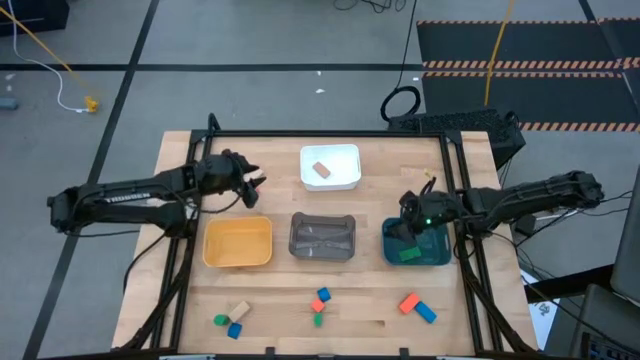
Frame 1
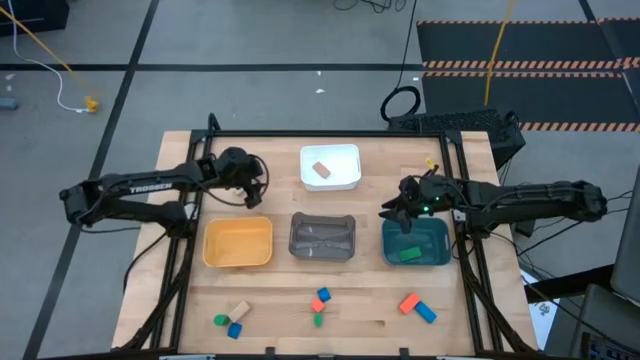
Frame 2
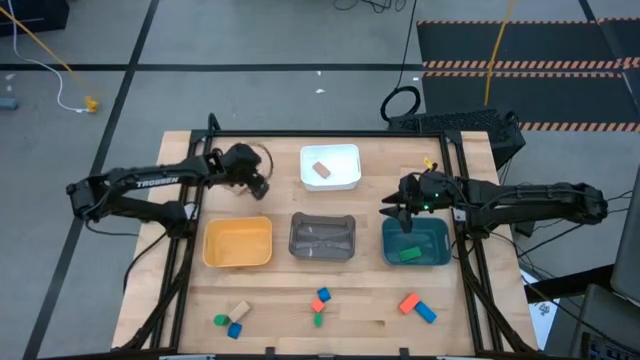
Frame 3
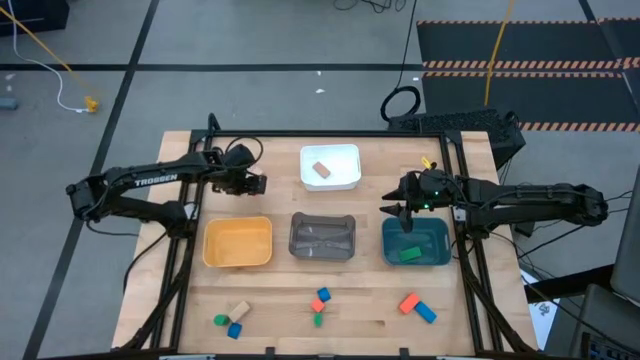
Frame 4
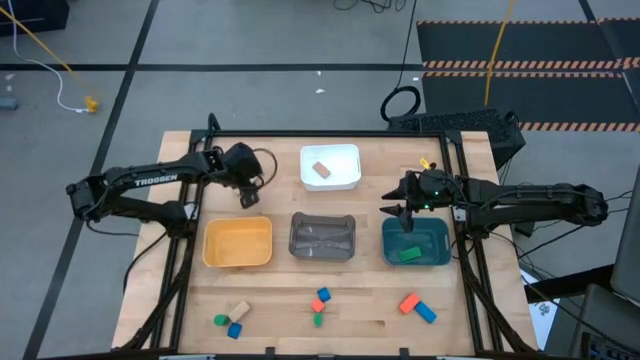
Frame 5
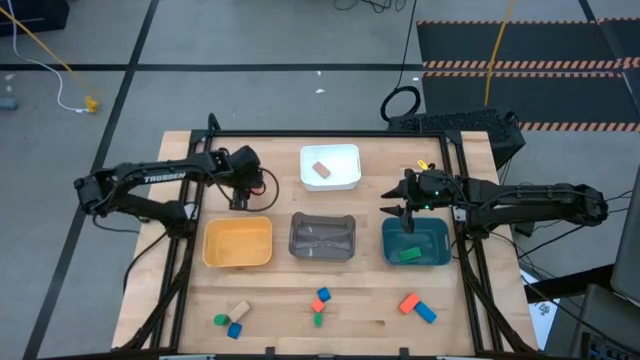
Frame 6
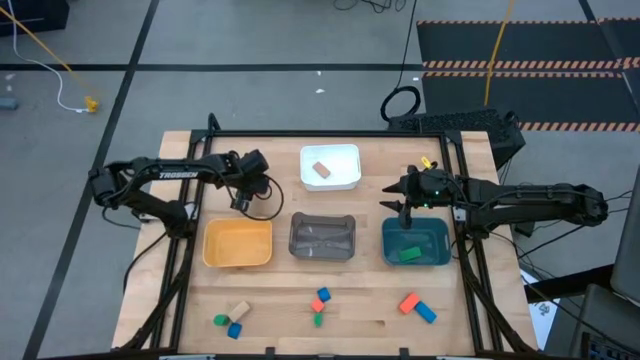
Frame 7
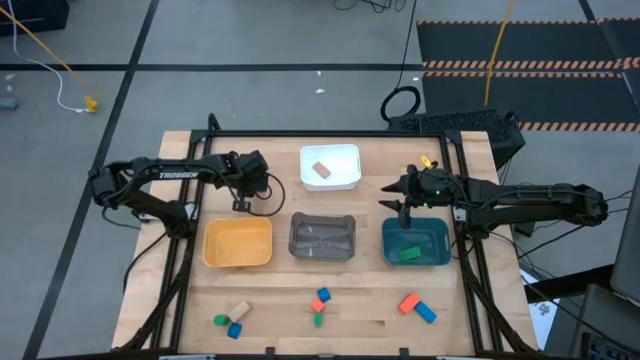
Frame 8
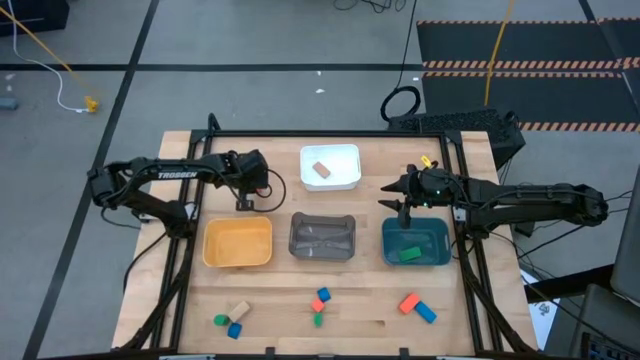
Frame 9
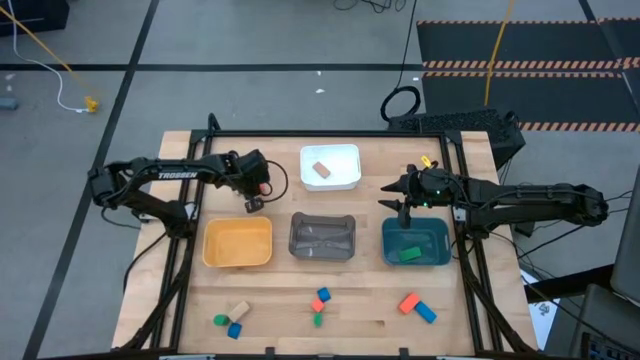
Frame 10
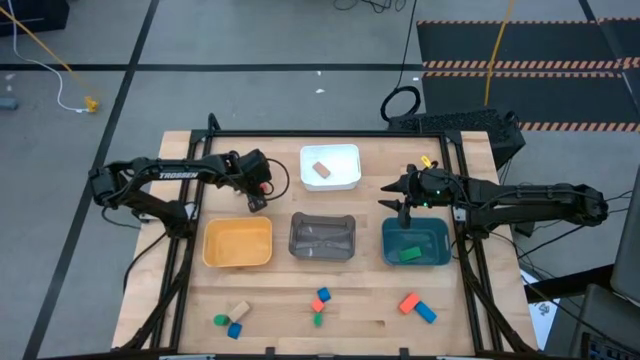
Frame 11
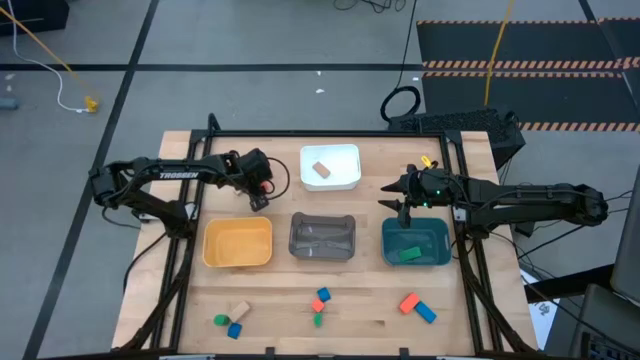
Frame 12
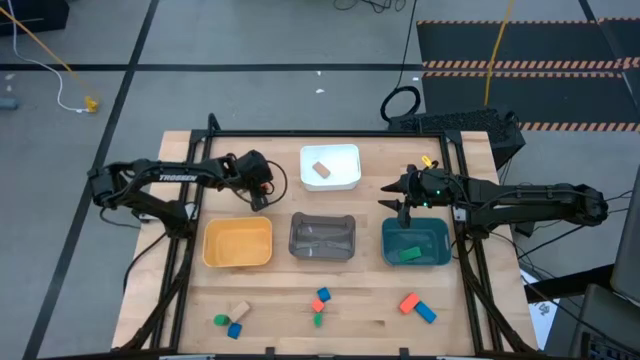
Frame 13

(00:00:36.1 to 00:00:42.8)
Task: Sort & place blocks by color
Put the top orange flat square block into the yellow bin

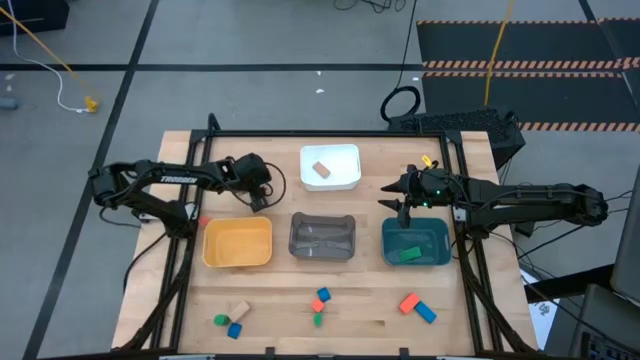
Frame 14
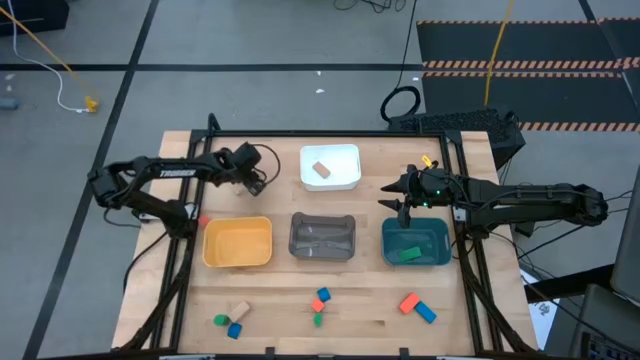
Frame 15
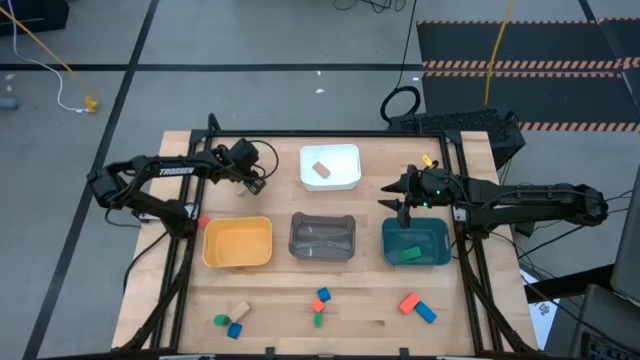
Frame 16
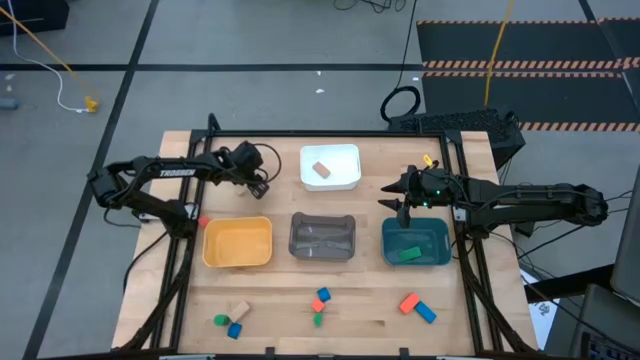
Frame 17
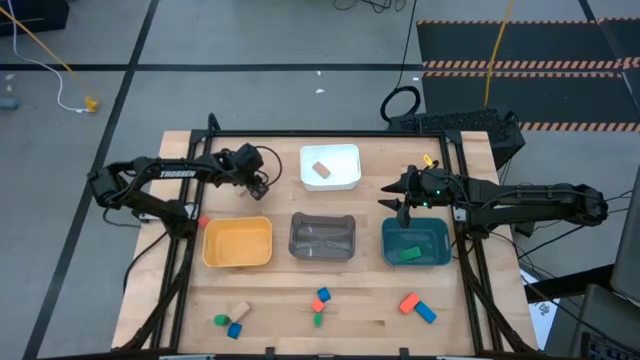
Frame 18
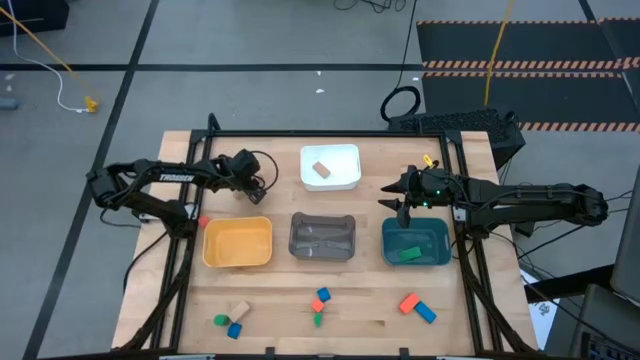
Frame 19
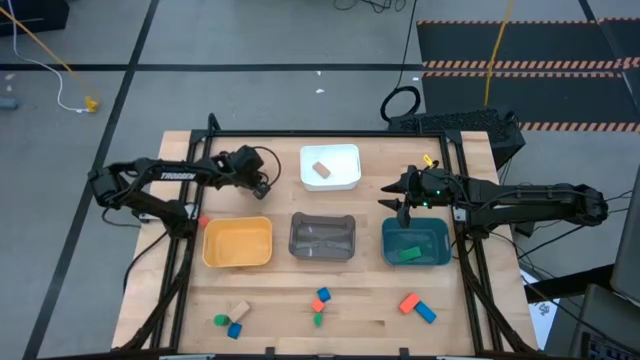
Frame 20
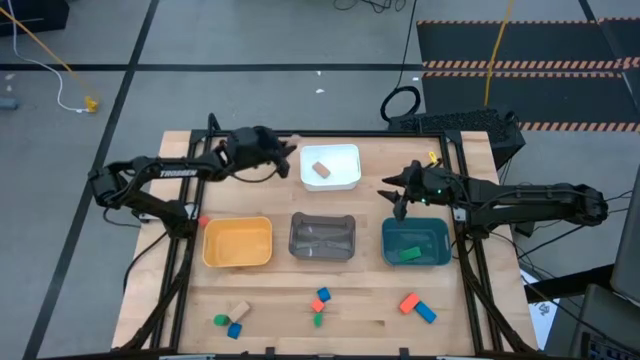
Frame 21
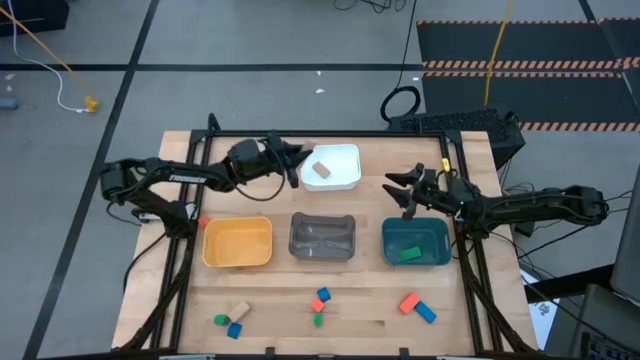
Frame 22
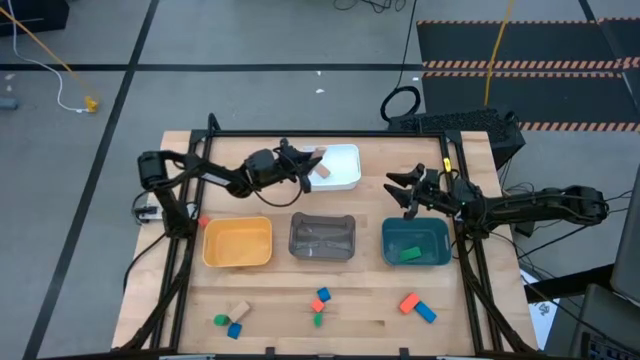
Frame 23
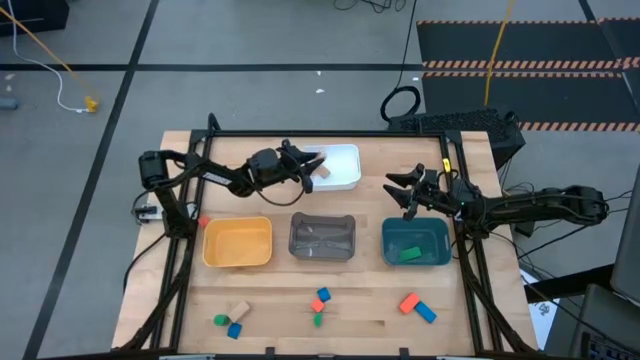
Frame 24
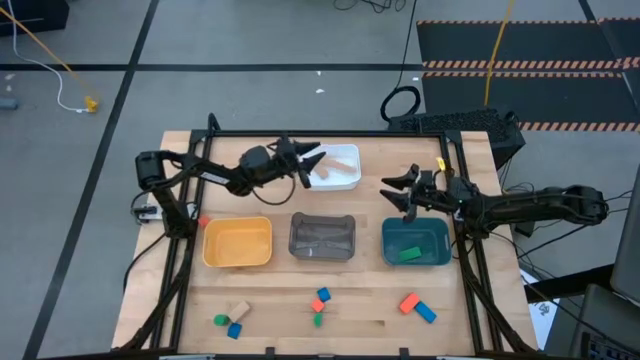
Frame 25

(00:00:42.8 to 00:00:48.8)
Put the top rectangular wooden block into the white bin

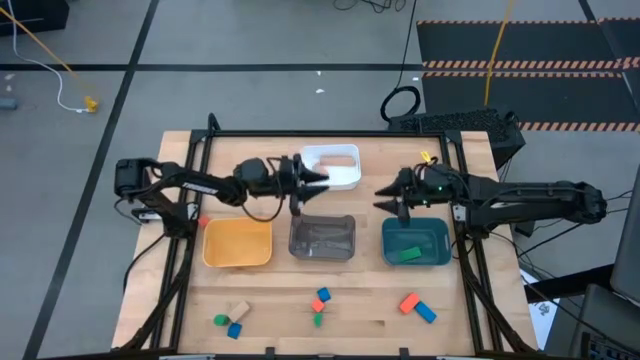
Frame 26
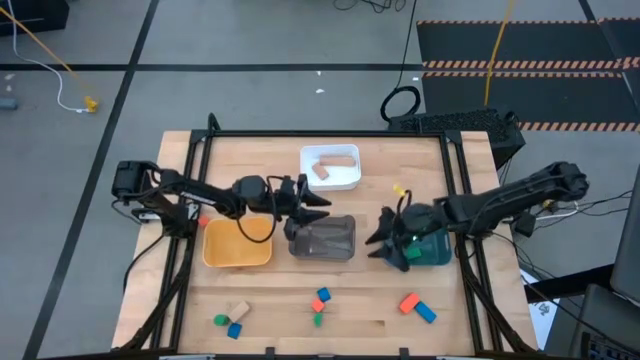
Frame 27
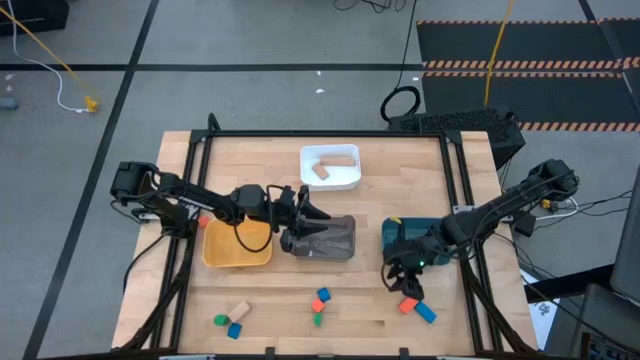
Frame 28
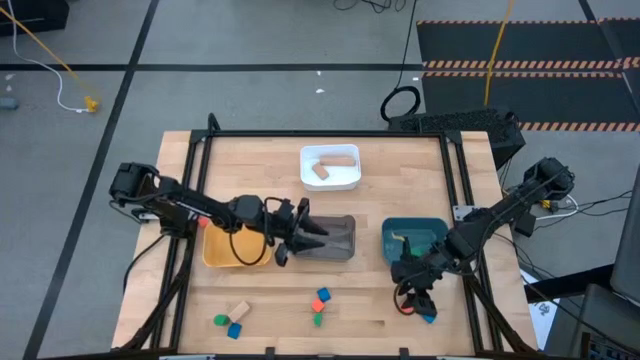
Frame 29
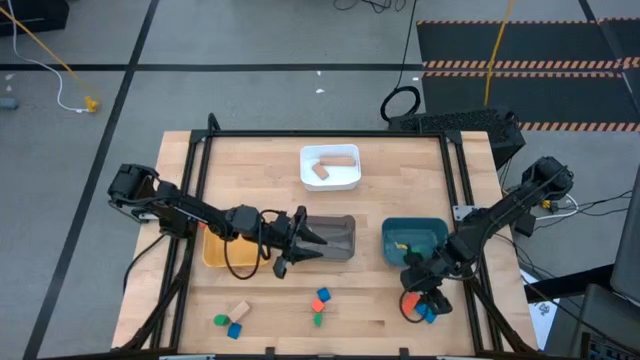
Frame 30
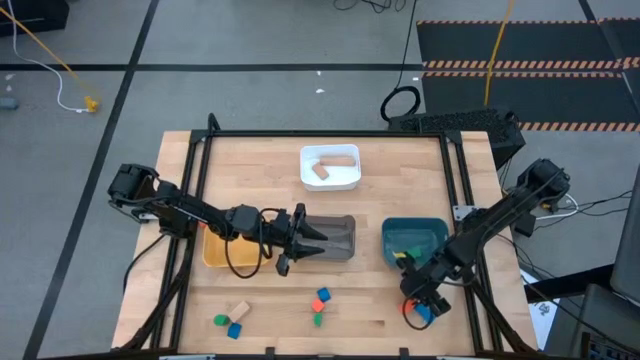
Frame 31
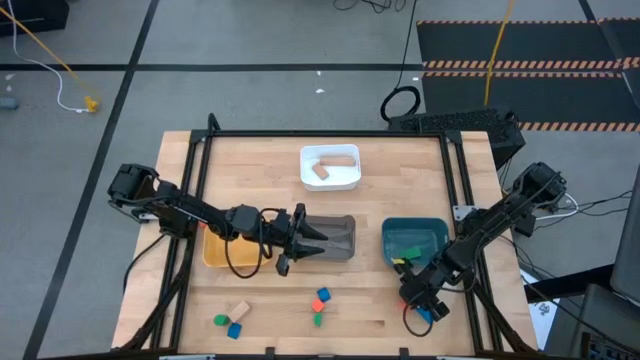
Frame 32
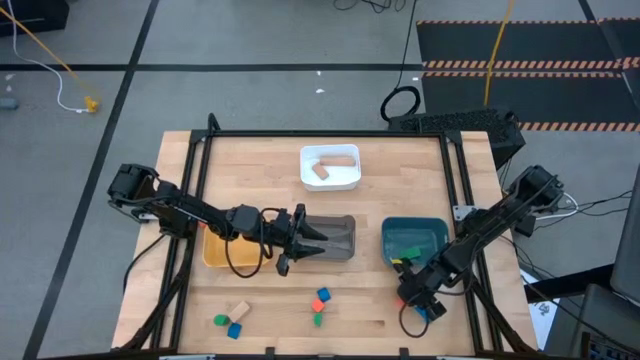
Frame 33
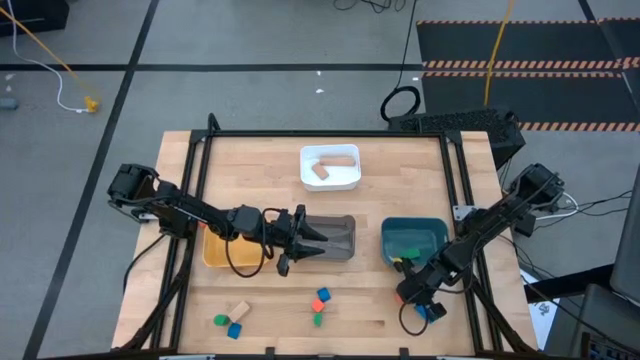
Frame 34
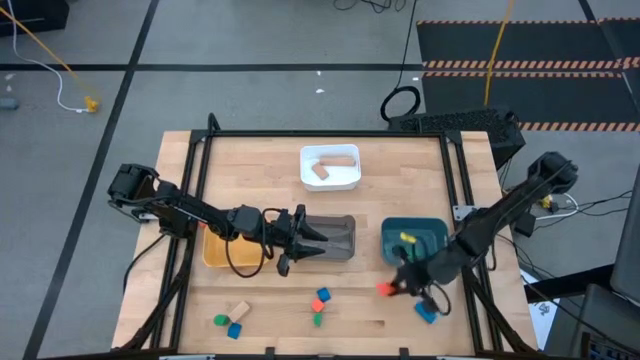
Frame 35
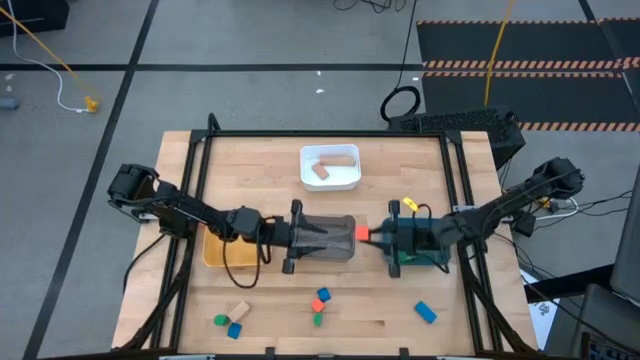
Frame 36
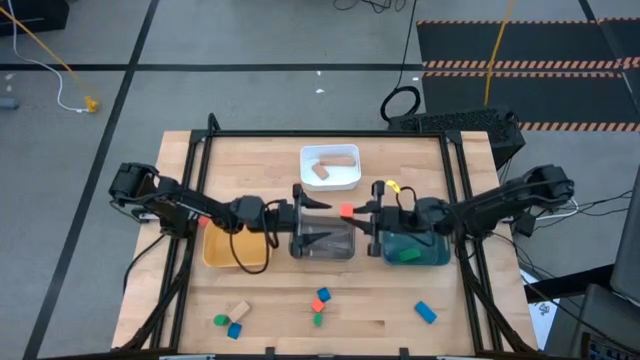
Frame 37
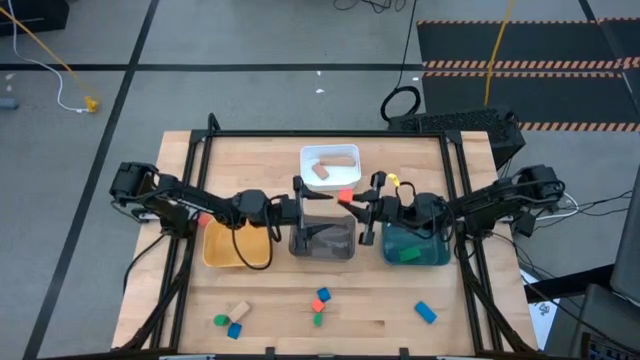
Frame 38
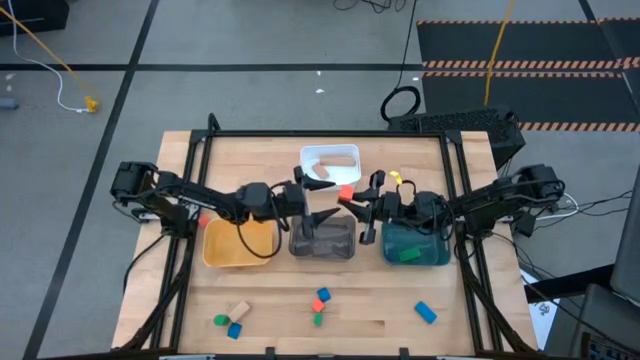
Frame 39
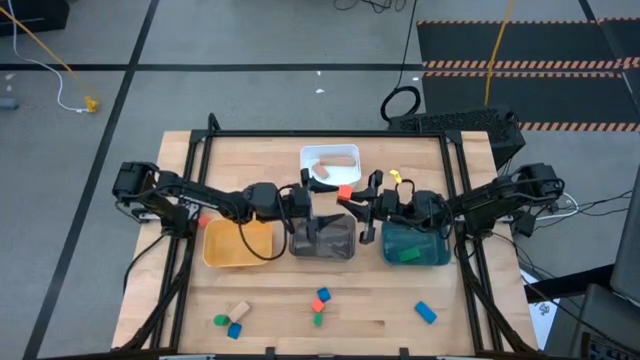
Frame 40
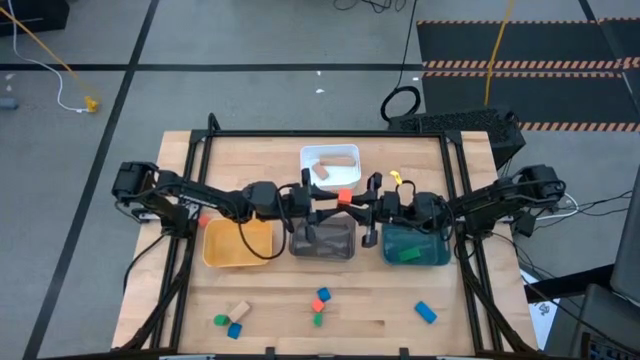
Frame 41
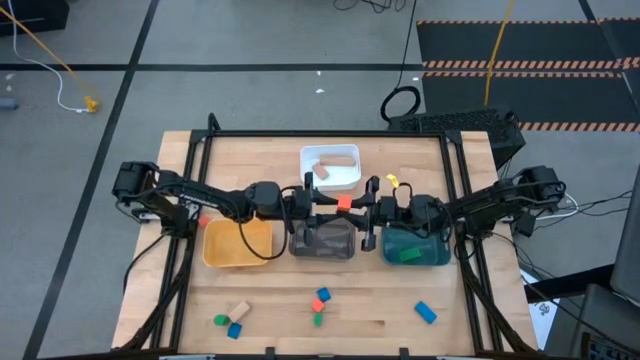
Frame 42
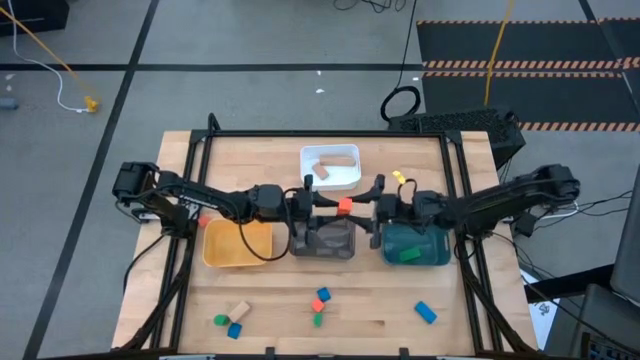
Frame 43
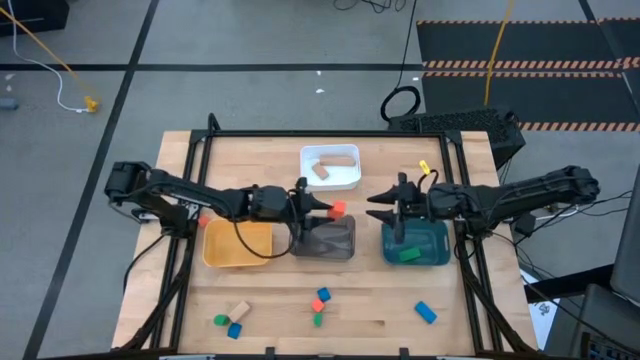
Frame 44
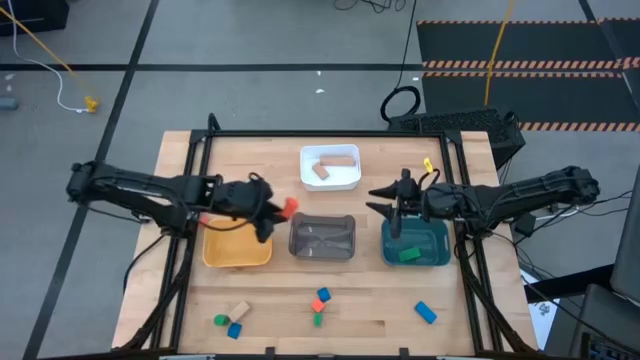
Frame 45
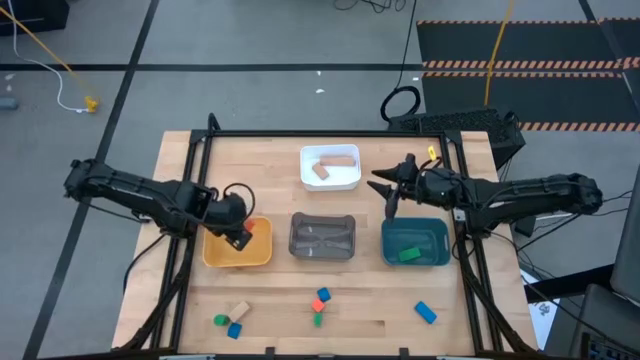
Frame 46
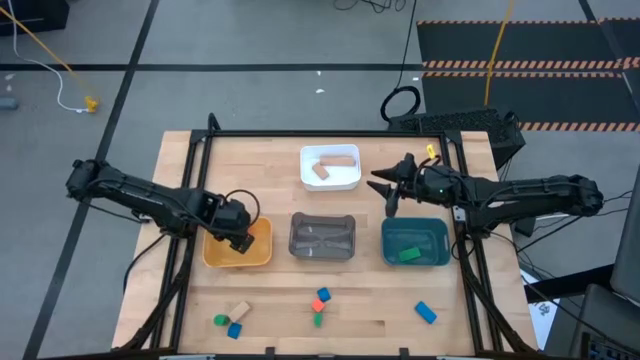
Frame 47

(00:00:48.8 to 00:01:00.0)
Put the right orange arch block into the yellow bin
